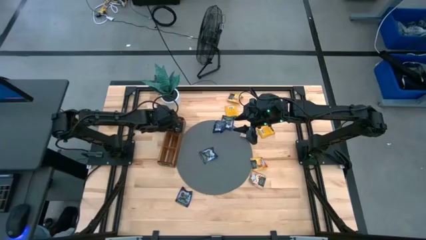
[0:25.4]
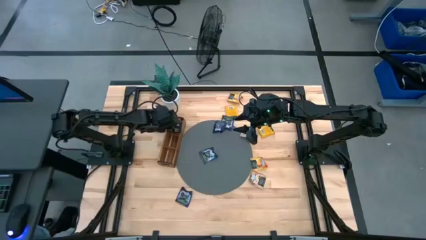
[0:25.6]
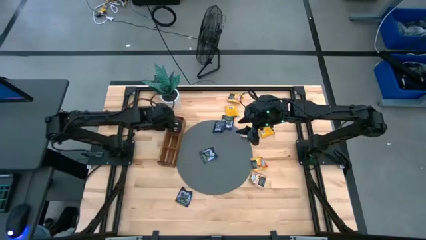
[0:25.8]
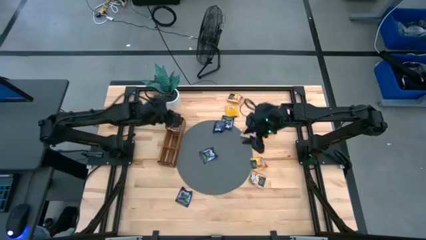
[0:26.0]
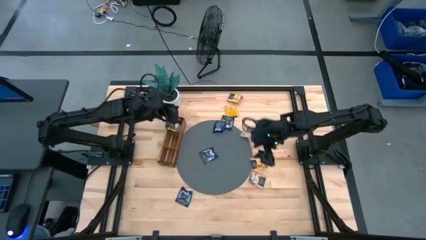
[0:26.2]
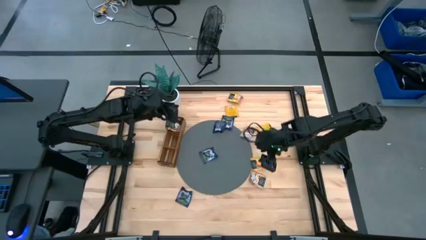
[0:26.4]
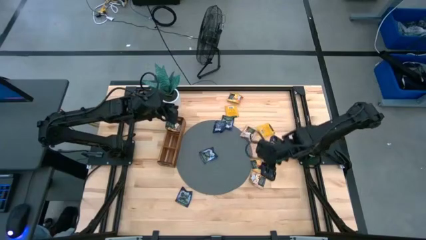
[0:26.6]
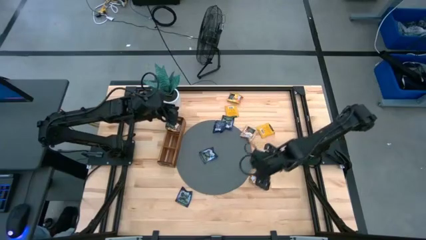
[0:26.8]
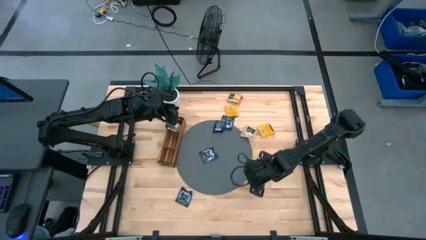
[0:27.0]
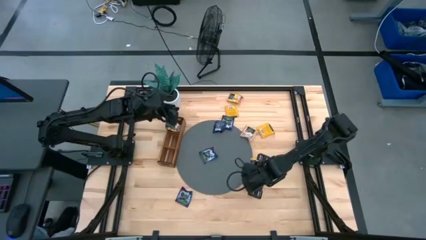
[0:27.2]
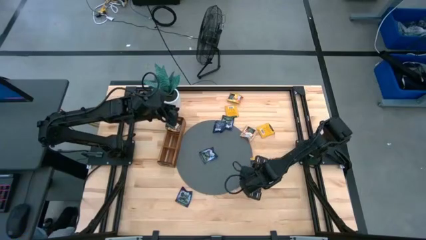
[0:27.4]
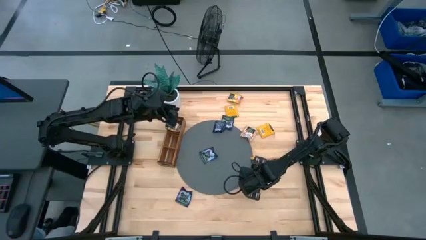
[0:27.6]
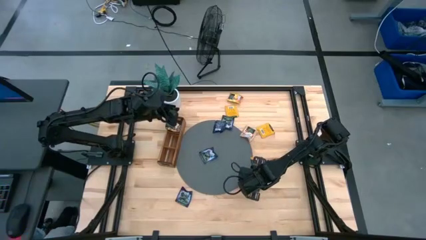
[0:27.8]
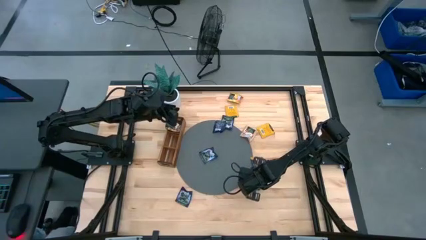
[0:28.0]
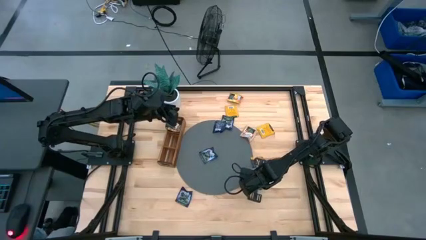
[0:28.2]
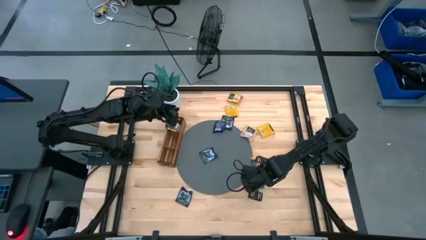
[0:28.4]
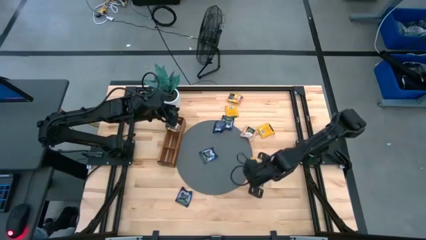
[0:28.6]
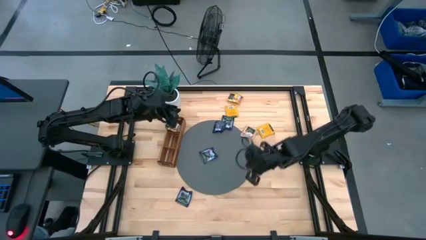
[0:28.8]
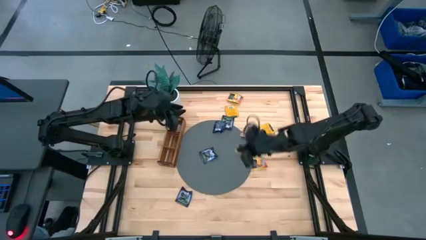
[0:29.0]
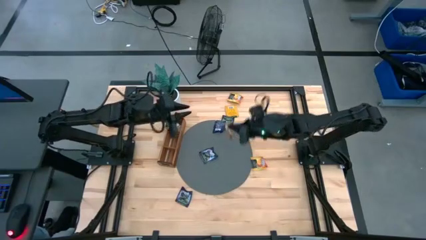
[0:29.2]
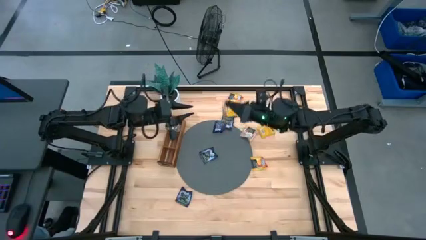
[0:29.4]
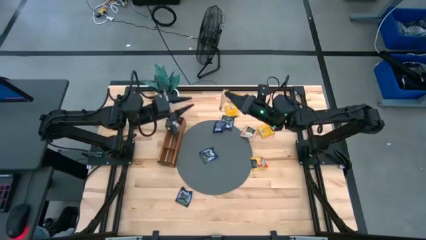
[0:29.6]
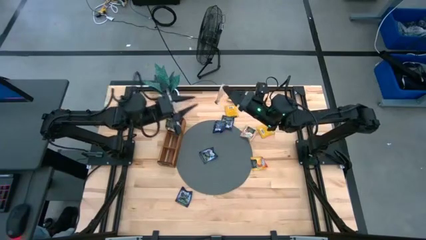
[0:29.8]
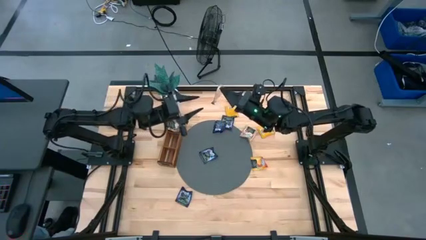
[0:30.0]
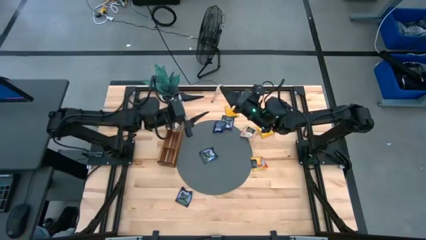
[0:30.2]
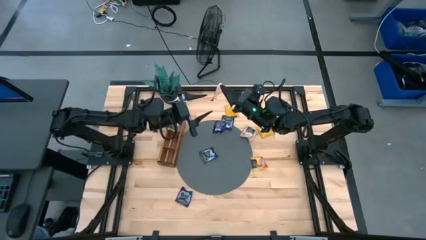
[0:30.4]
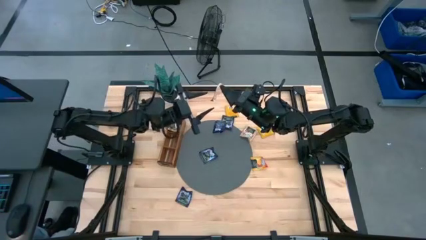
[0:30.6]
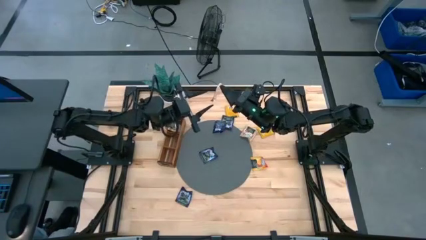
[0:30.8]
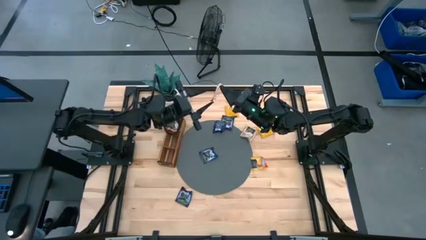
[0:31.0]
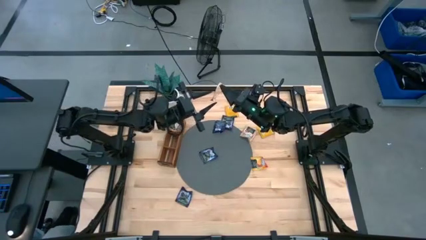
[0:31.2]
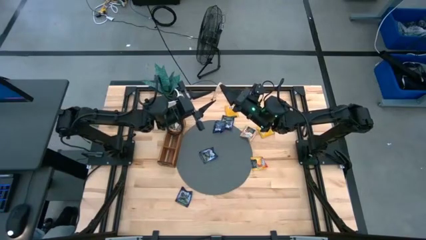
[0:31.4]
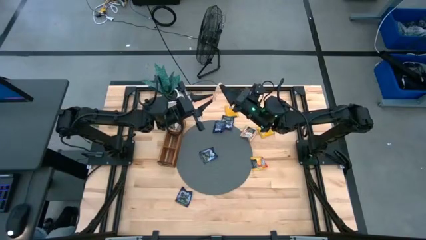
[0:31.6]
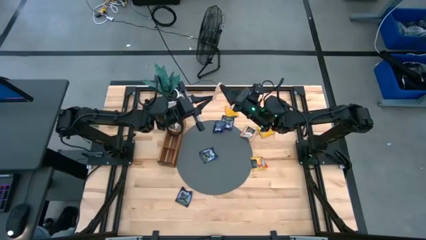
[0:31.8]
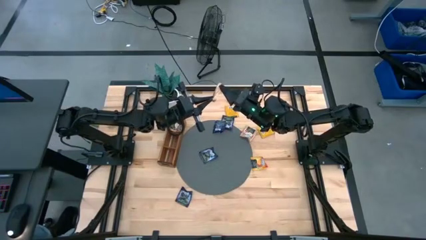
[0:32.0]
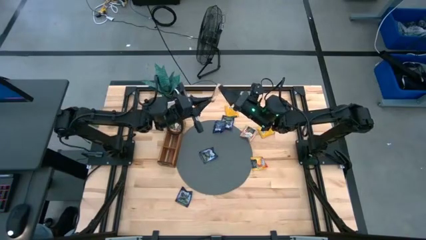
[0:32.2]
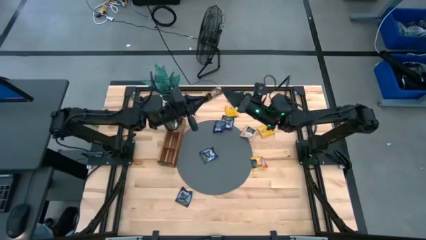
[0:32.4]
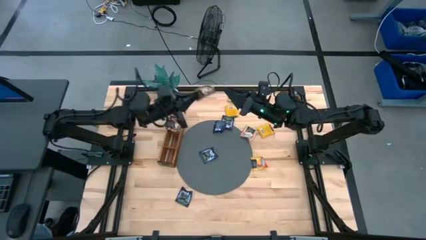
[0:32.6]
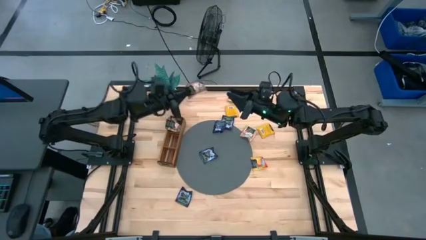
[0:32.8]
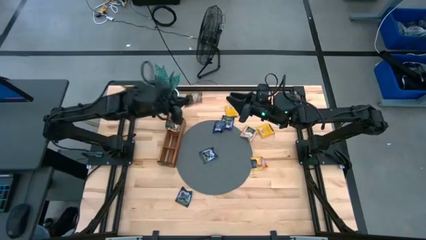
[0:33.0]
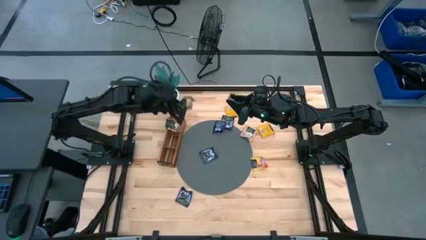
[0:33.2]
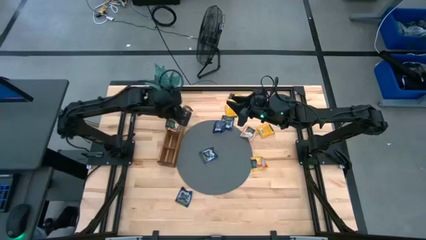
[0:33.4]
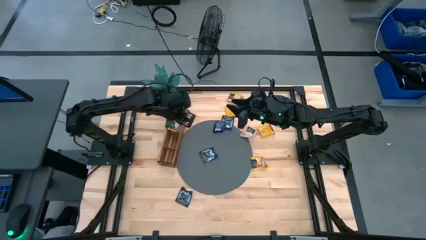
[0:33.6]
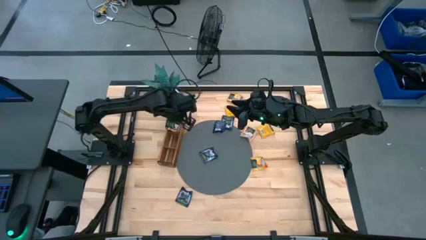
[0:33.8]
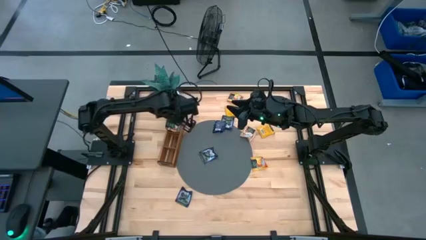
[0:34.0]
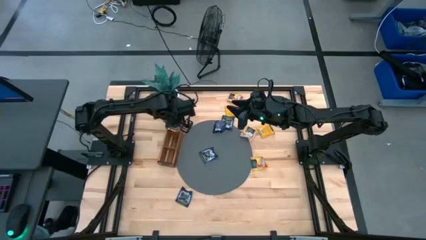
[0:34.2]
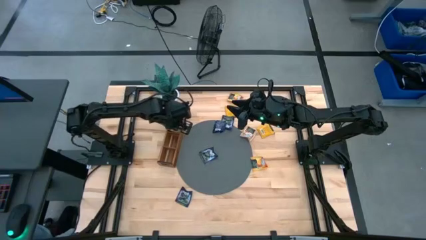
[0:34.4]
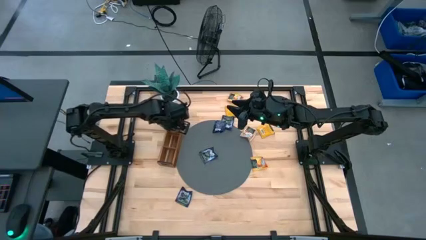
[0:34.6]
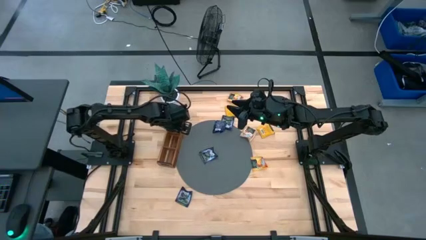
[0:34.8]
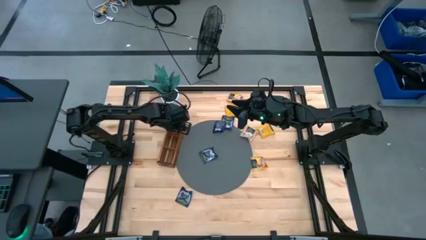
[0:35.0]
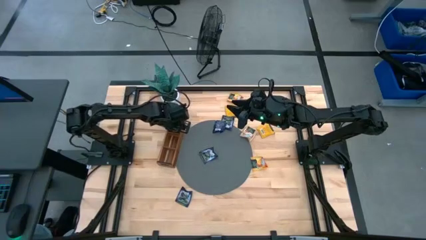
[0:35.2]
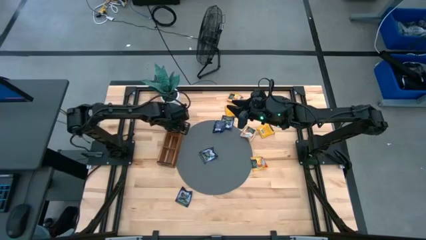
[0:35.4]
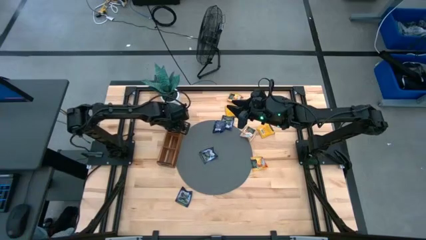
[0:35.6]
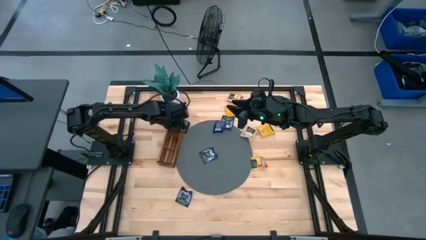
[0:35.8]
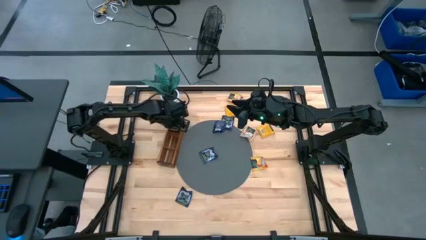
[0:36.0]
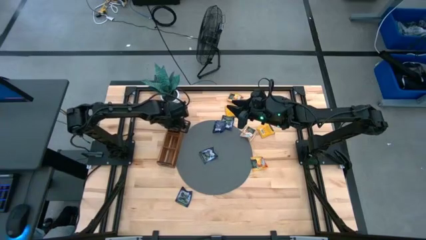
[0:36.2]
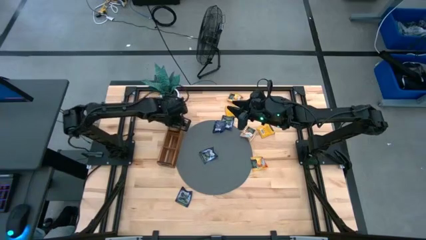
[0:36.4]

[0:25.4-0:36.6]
Task: Pick & Place Tea
Put the brown tea bag into the top section of the wooden organizer

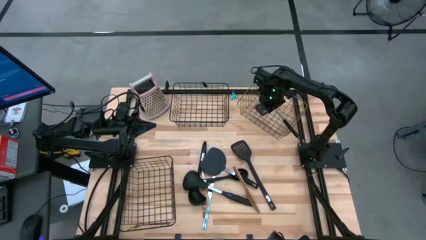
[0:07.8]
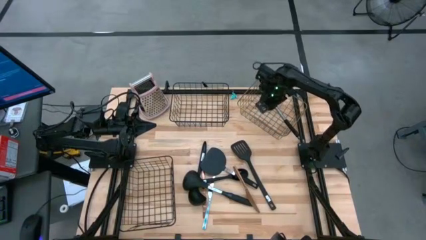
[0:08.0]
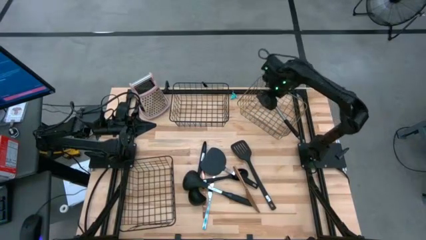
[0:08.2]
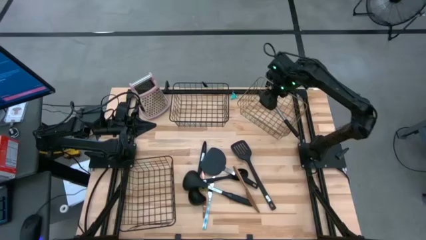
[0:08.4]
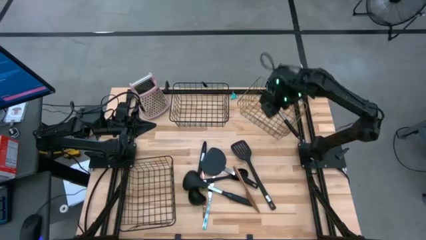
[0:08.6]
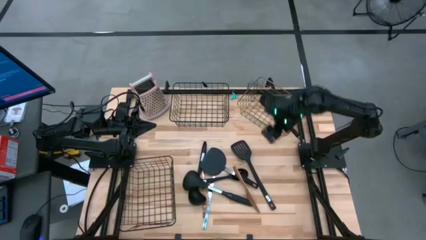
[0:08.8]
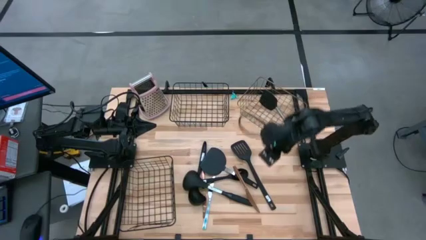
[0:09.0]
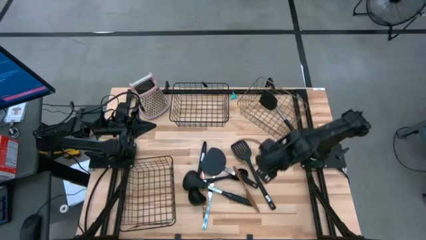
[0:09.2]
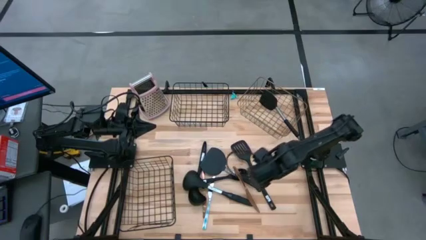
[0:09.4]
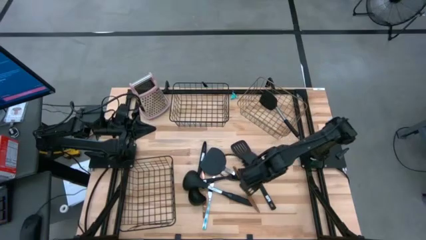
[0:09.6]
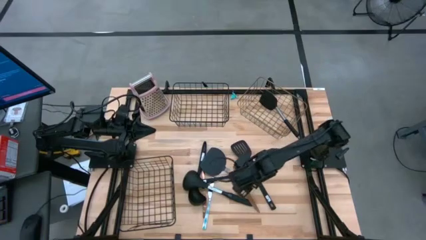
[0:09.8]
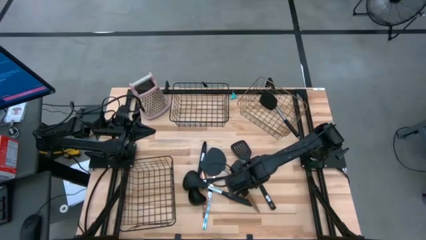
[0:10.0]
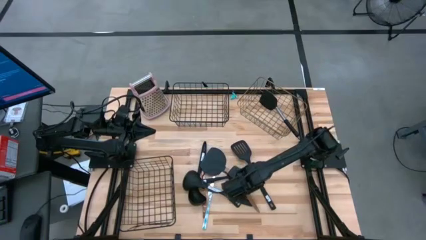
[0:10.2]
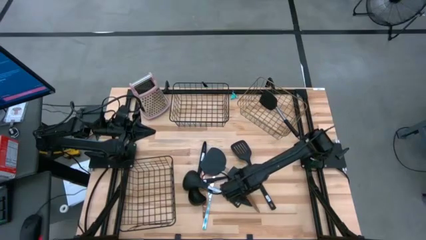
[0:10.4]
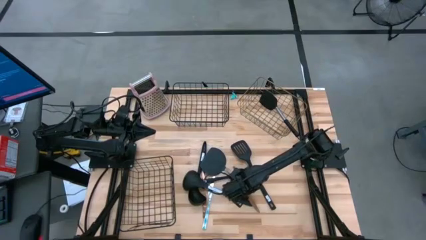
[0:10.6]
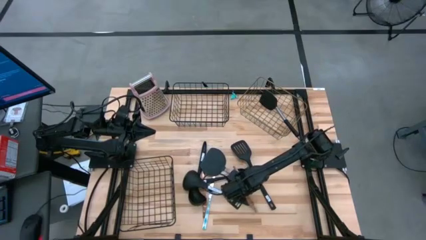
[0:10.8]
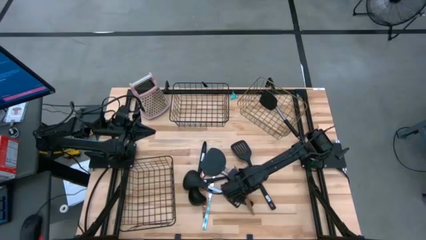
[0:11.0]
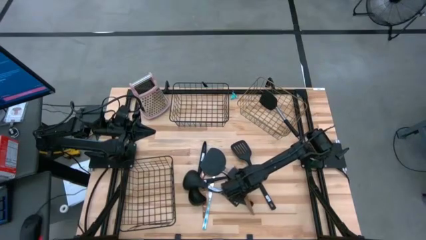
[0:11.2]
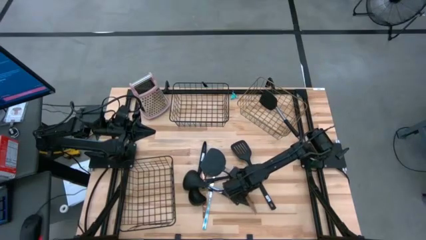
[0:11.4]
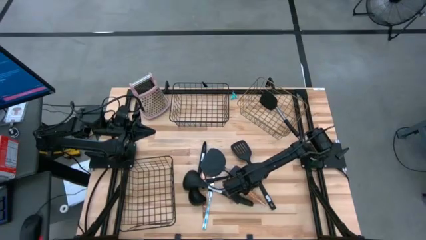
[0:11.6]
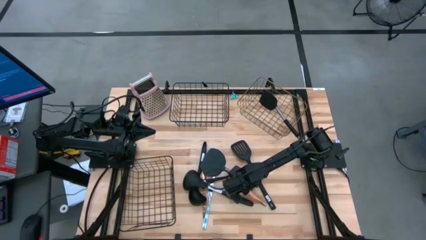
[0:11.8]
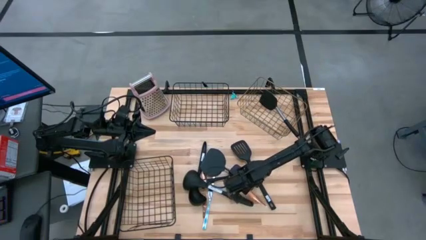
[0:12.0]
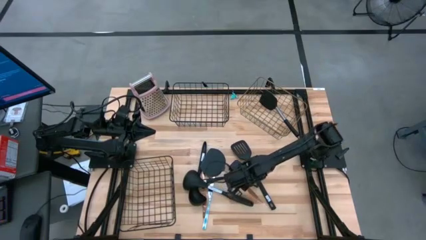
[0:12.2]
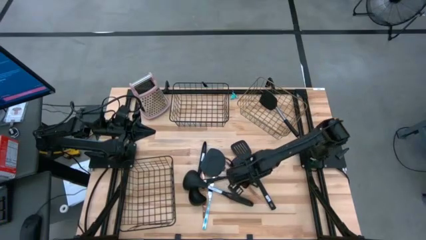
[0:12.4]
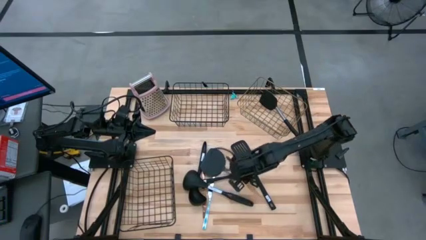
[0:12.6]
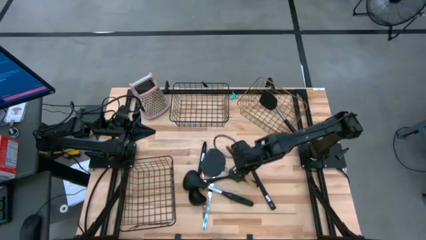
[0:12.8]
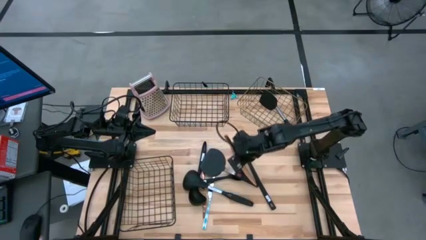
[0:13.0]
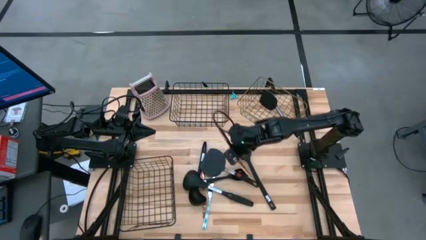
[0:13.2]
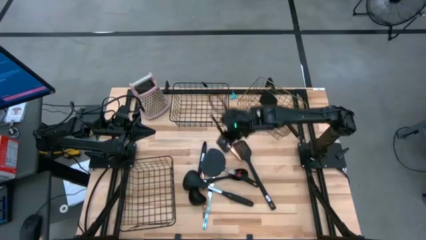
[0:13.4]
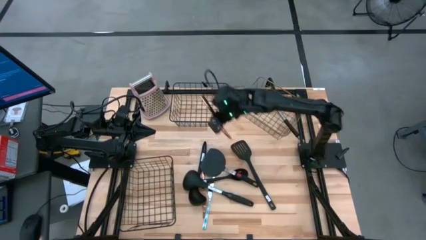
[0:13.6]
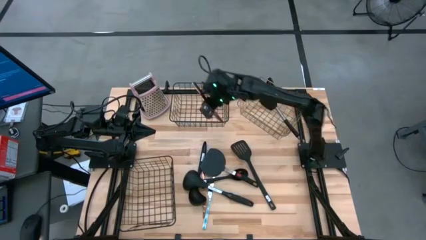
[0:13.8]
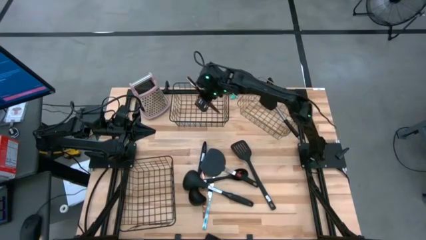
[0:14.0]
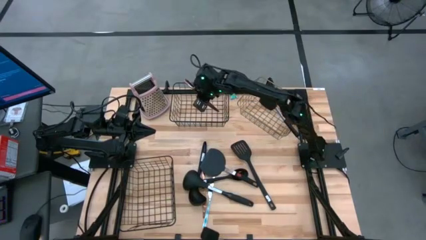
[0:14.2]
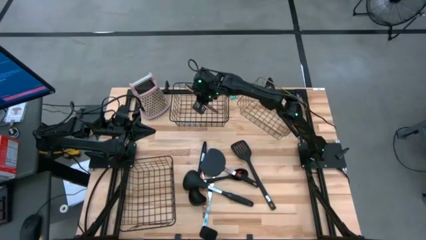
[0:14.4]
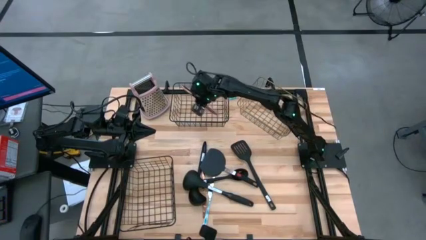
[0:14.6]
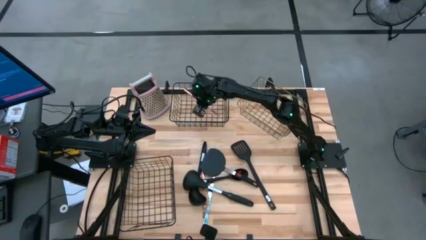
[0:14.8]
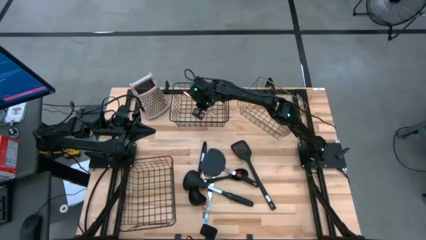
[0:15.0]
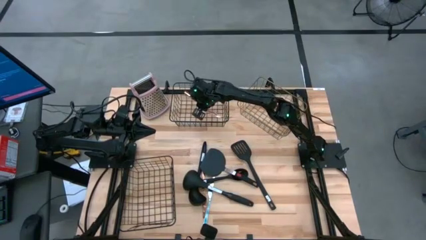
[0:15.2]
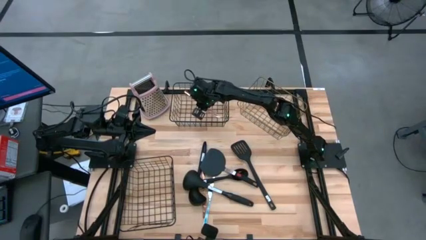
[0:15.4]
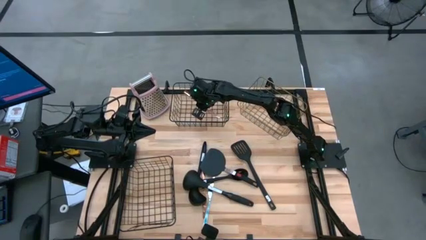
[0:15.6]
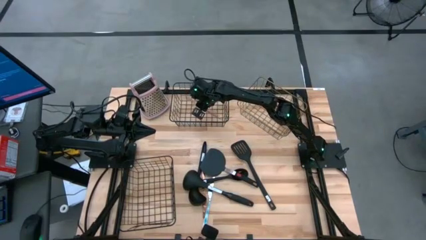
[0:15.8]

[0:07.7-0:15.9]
Task: Pick & Place Kitchen Items
Put the brown knife into the top black wire basket
